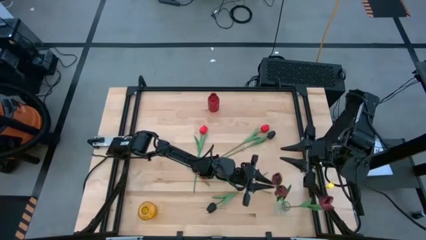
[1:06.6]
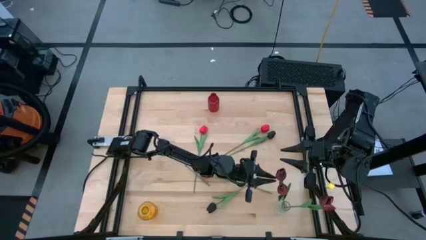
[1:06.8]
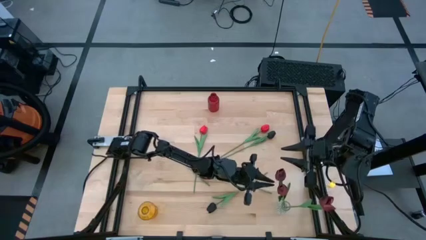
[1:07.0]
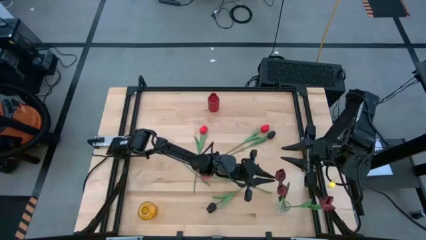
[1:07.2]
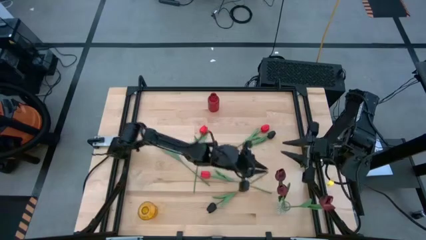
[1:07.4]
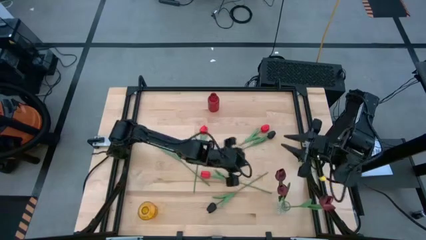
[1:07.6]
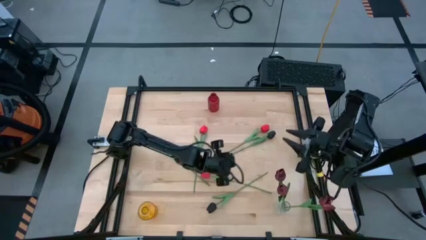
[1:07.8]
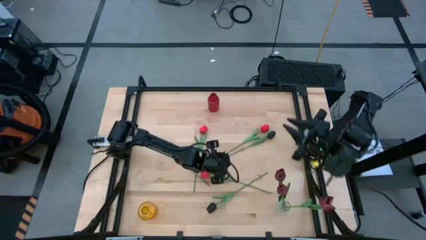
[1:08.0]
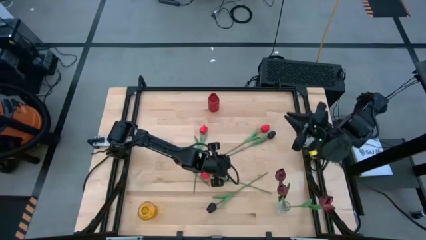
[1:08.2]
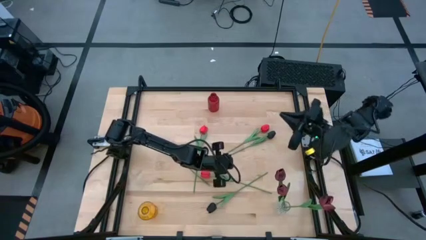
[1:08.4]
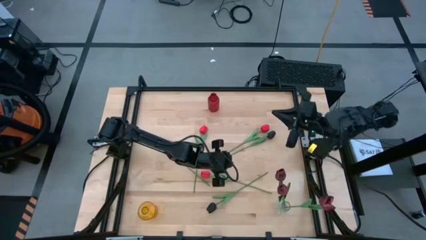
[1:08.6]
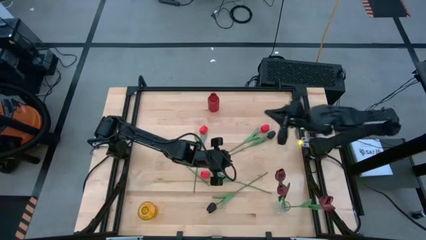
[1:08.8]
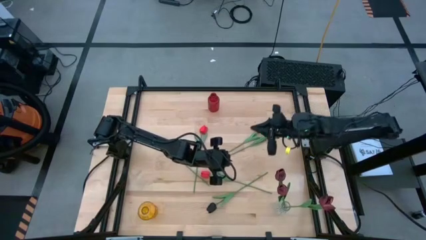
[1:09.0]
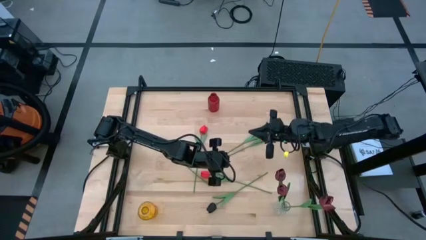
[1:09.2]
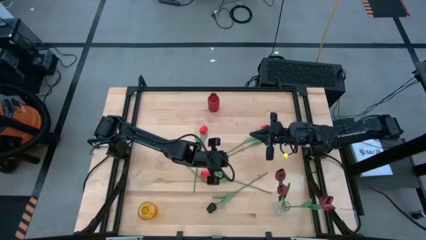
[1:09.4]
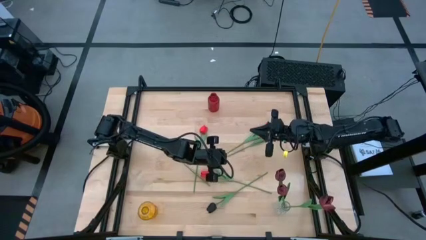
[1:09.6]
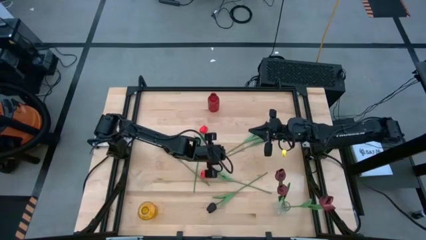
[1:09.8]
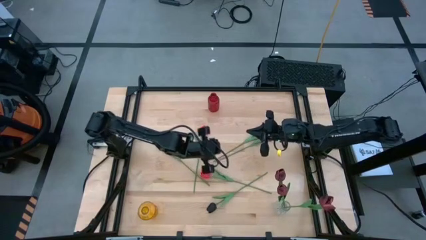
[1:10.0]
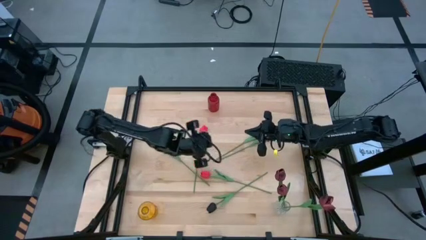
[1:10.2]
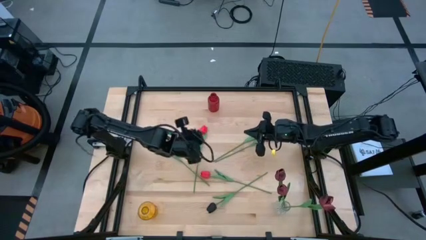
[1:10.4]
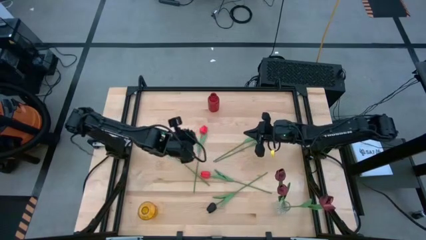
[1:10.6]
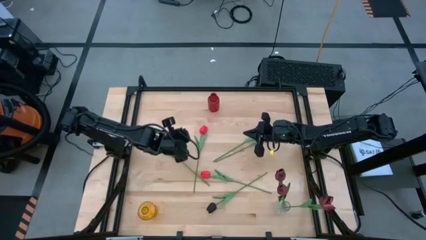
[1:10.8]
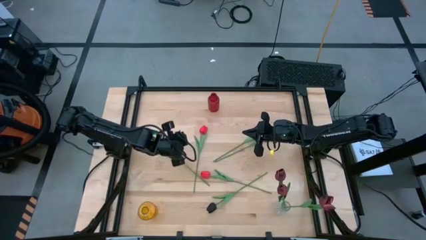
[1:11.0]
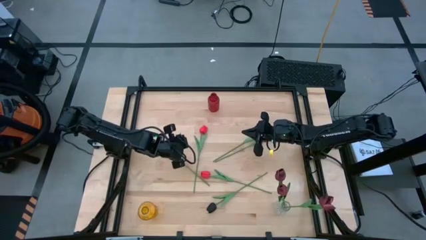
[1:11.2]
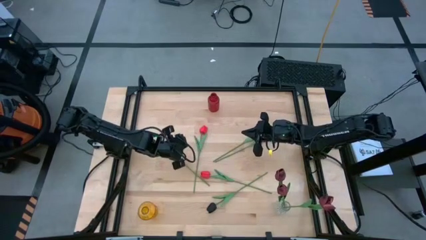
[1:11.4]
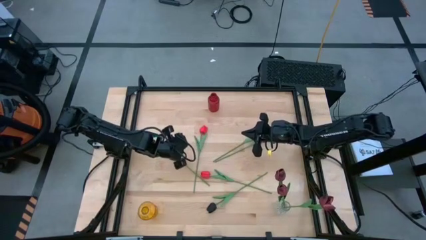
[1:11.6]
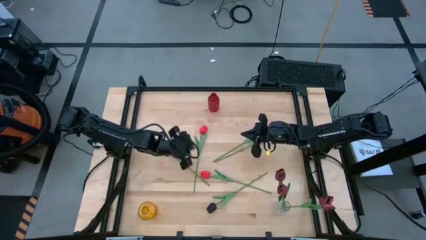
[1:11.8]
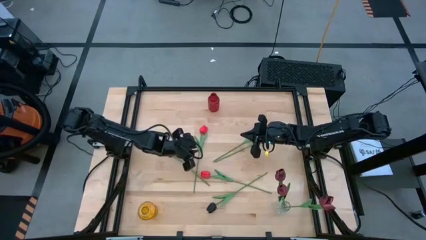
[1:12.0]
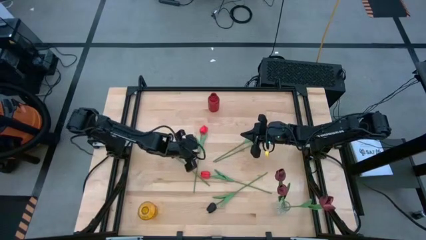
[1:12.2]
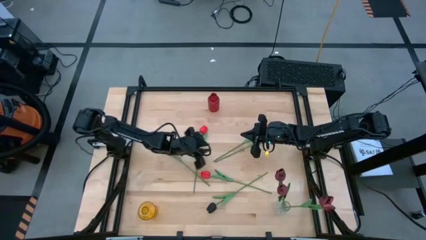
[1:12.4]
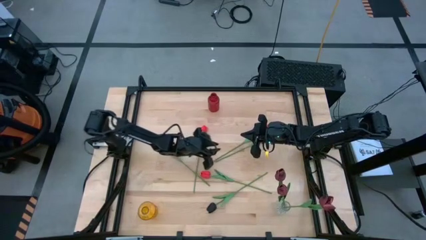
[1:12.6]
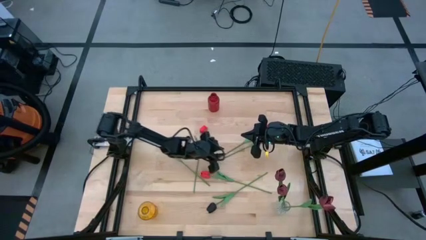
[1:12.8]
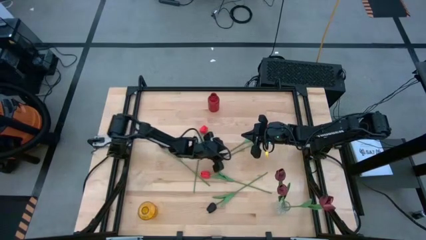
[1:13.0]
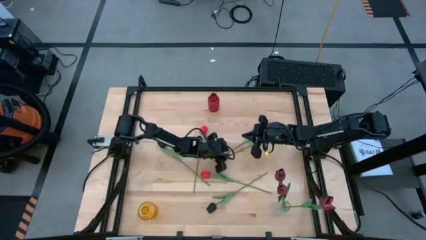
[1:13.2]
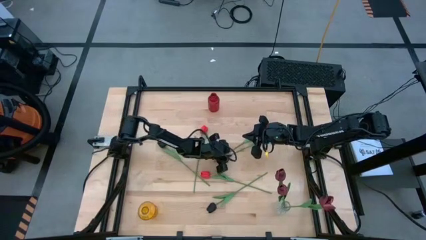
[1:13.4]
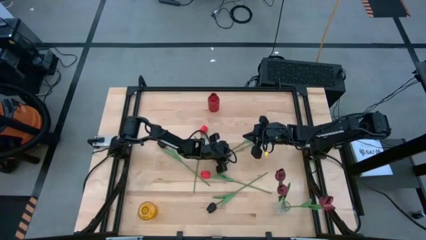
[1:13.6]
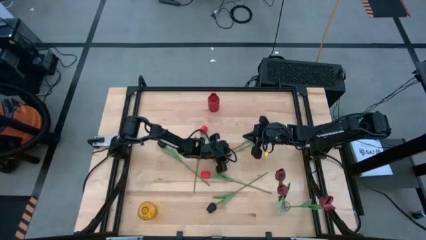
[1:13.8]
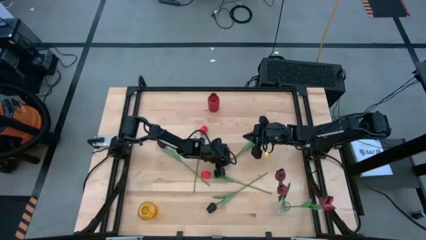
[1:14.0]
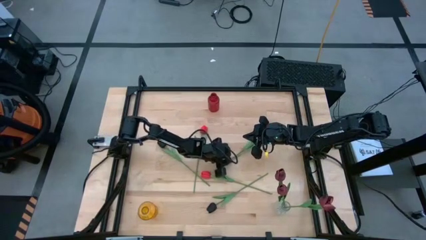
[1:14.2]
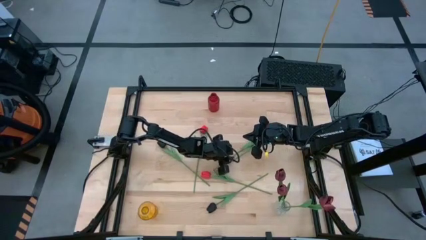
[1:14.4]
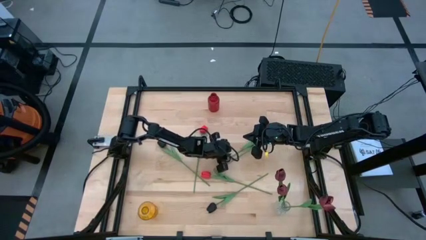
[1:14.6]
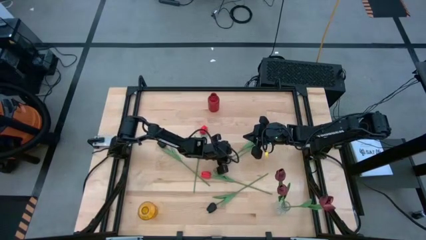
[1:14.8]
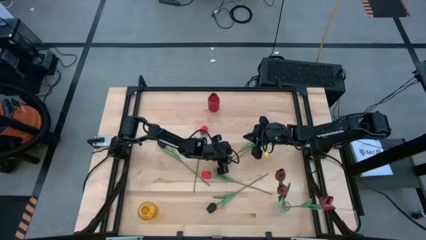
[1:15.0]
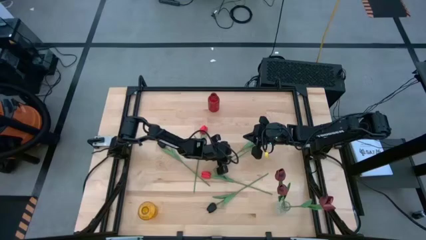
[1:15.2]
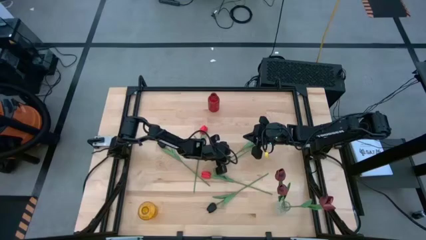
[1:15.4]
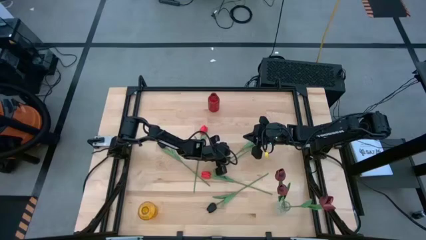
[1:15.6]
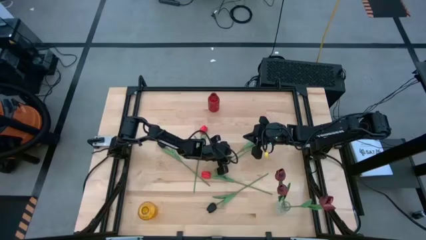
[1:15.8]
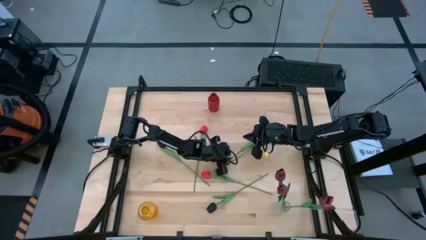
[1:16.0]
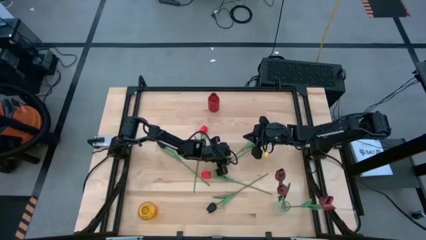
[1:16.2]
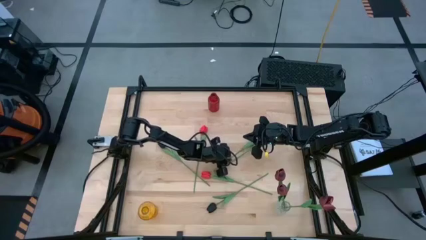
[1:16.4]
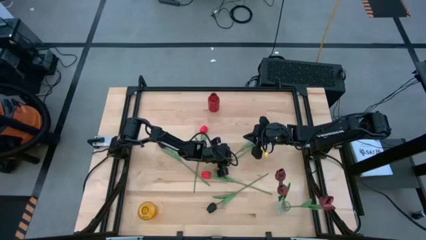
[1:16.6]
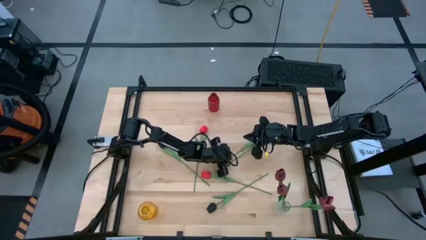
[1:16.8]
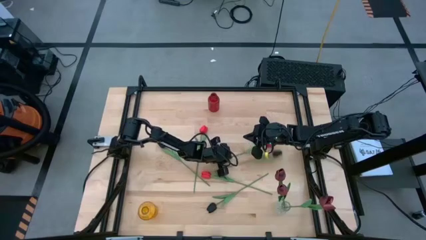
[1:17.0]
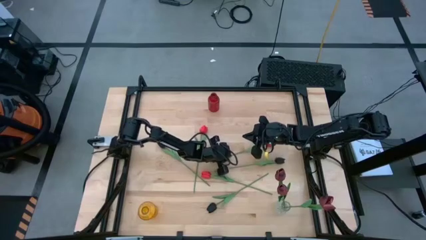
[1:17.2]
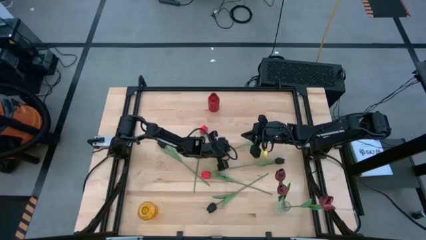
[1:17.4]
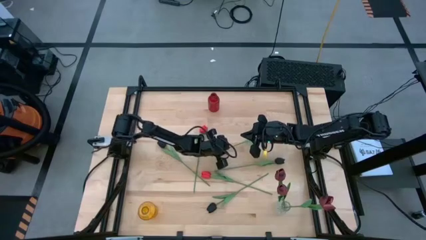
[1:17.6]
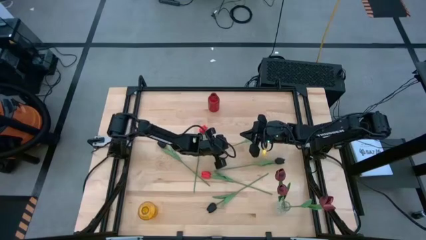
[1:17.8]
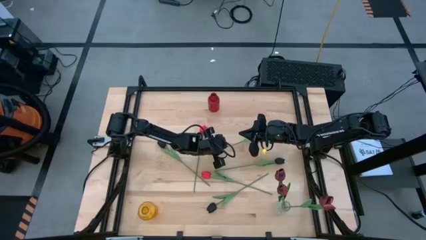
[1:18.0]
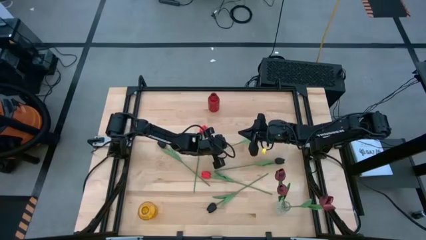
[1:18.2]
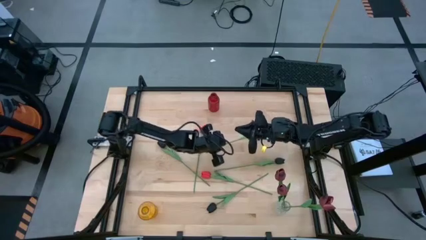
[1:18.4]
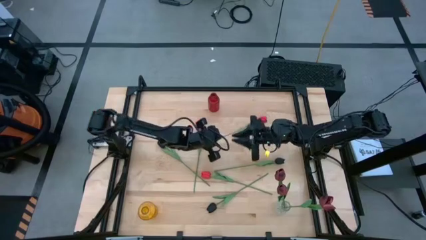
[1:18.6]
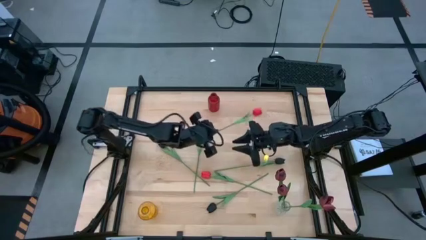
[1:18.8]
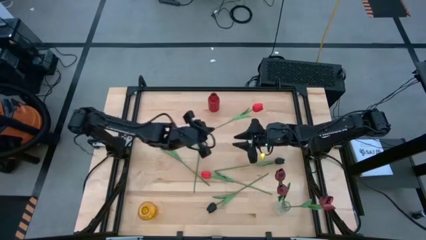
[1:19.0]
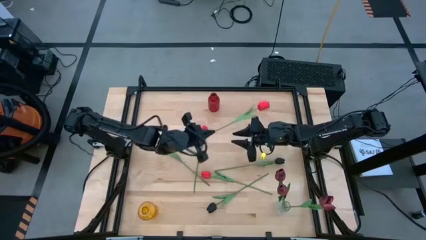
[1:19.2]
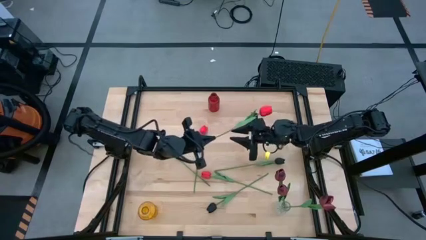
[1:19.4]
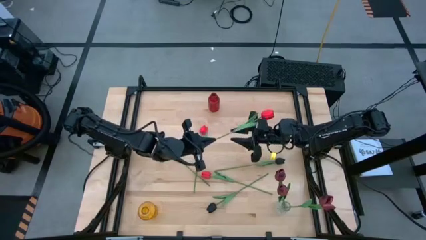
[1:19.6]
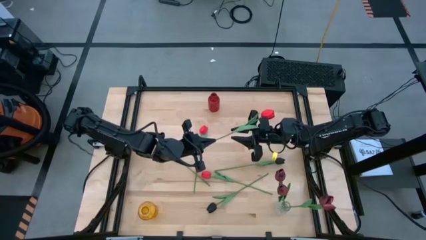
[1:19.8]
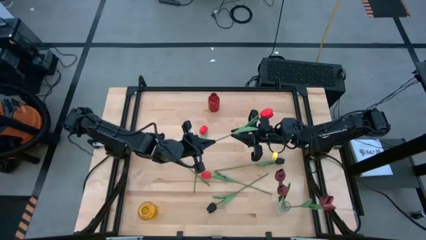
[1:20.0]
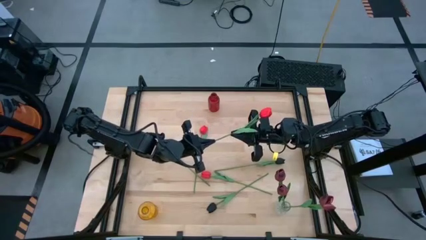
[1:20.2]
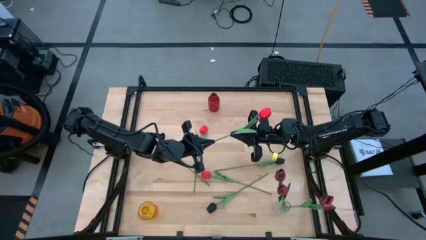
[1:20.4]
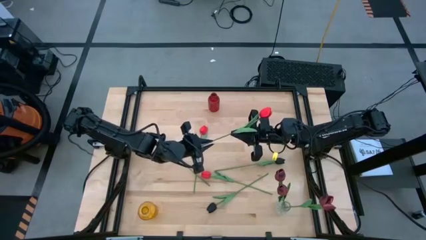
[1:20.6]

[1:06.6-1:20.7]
Task: Sort flowers into vase by color
Put the top right red flower into the yellow vase

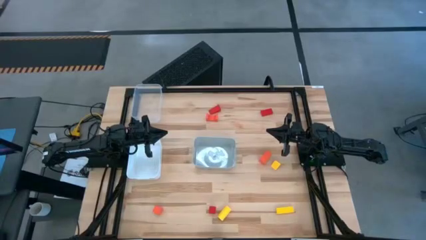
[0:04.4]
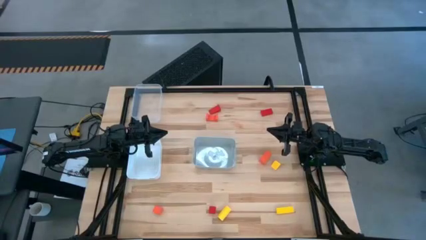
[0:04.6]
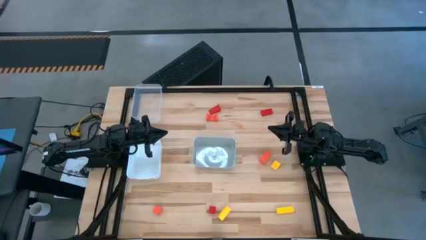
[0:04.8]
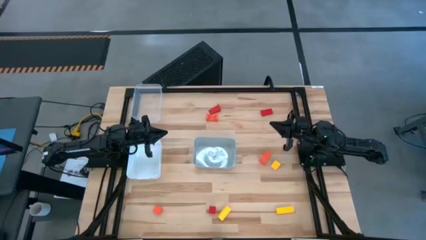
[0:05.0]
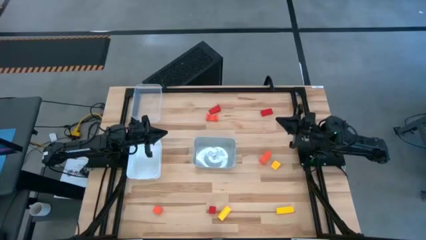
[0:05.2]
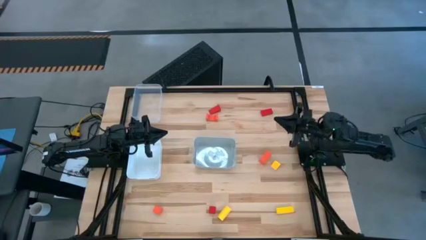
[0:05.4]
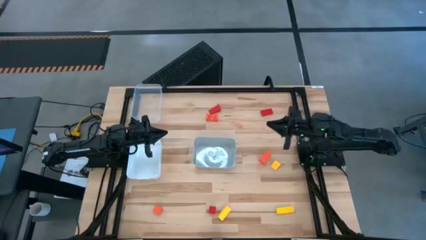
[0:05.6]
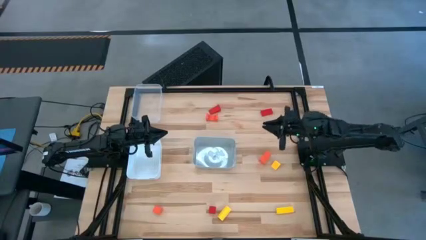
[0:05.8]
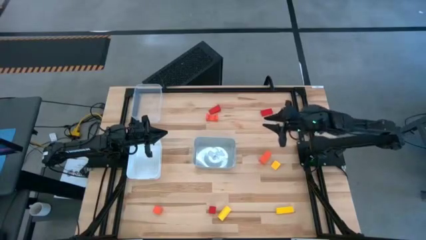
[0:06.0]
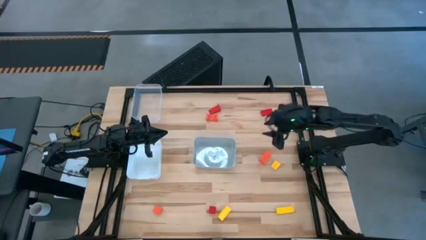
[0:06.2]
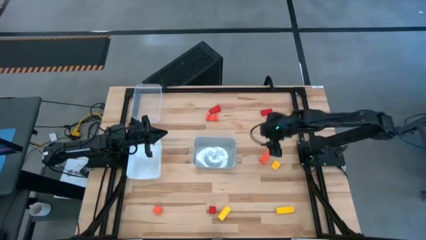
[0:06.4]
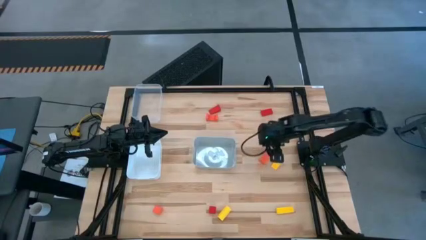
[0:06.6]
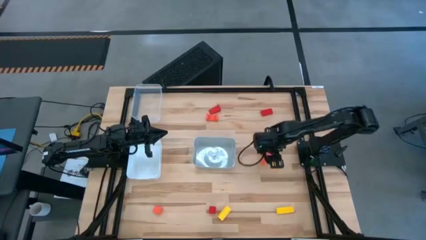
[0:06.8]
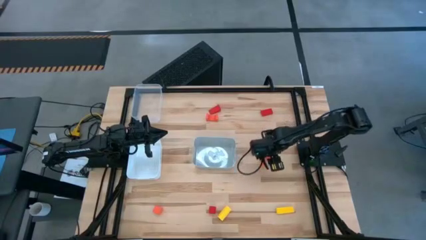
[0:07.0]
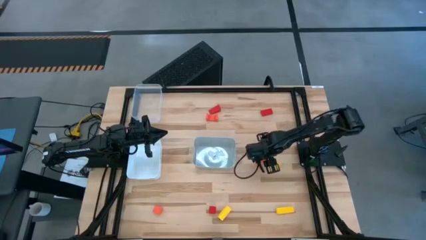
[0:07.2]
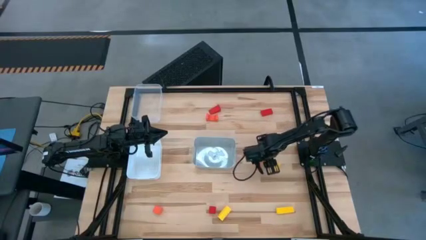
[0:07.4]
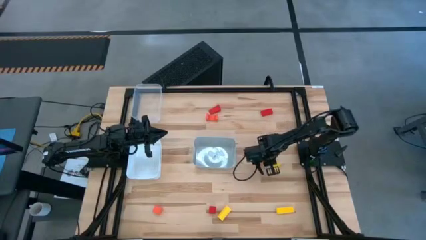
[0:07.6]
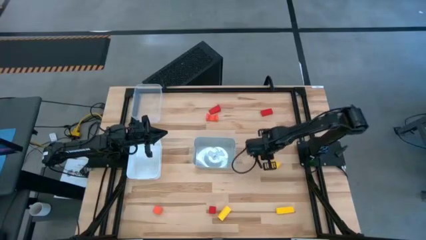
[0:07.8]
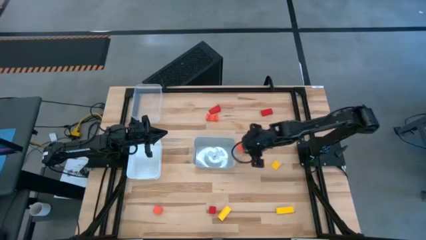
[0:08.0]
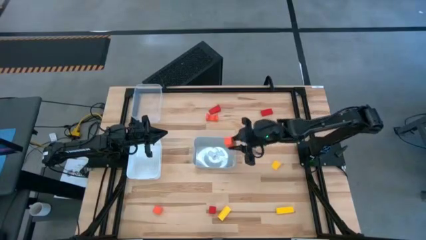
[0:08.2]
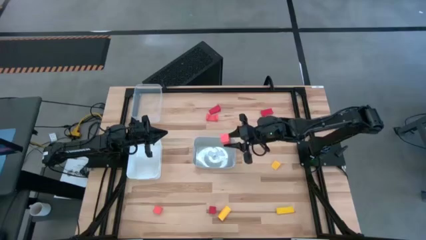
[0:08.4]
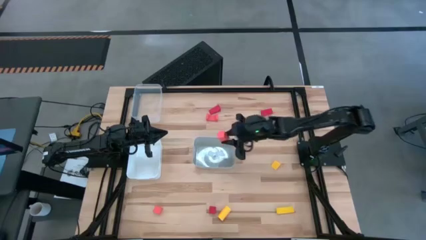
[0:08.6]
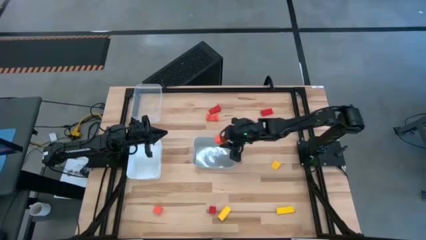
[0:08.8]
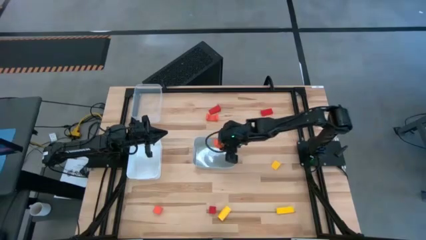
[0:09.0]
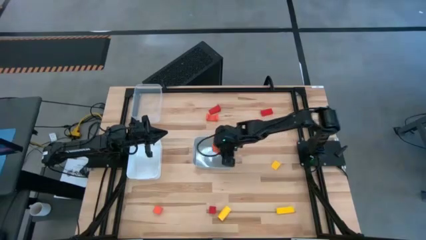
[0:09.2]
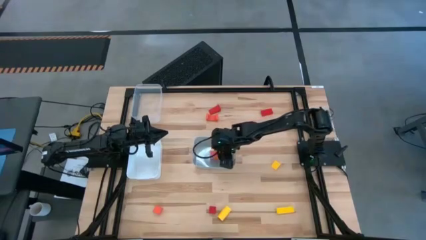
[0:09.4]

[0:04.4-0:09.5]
Task: Sort & place blocks by color
Put the middle right orange wooden block into the gray bin
